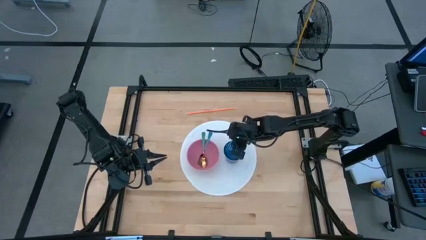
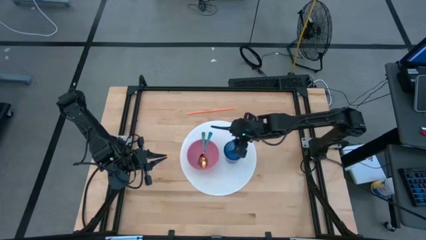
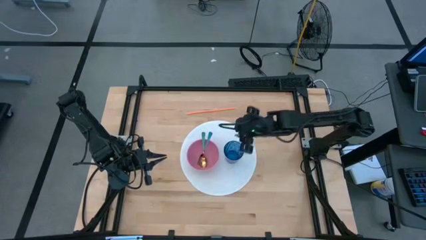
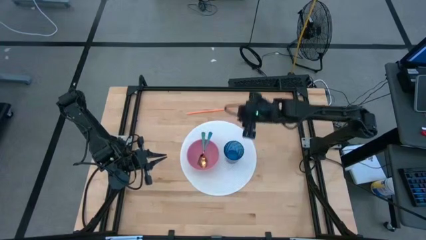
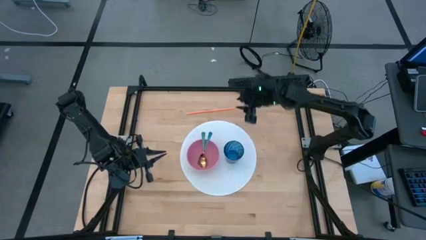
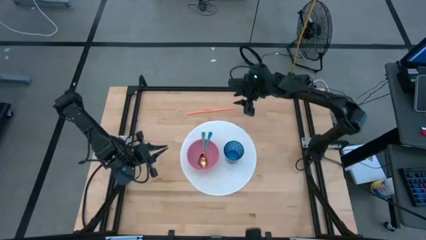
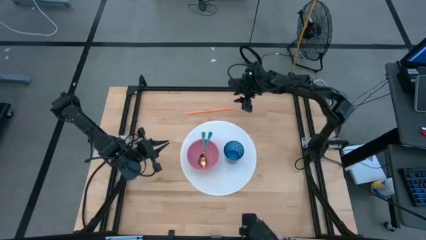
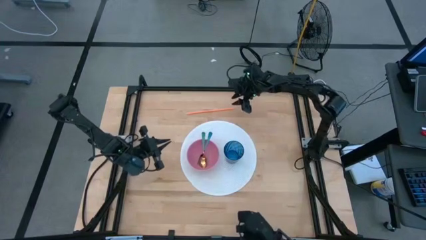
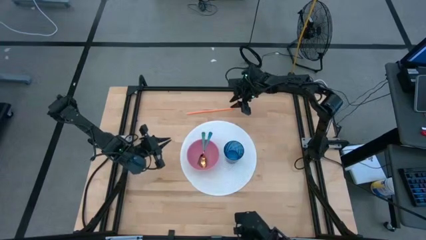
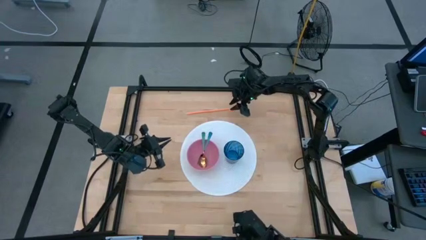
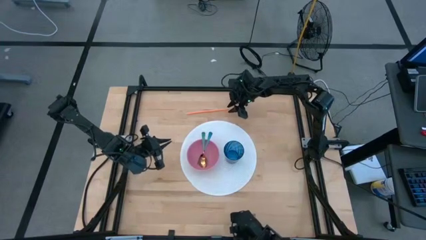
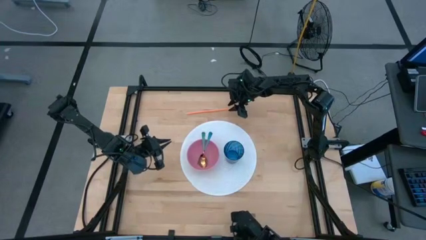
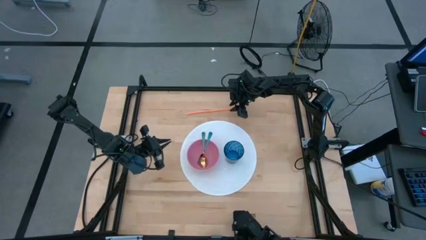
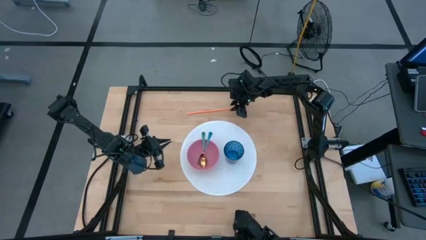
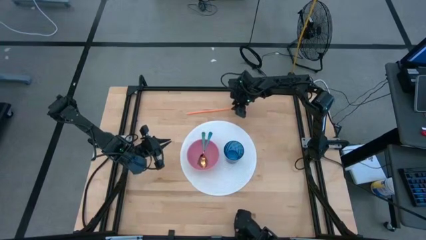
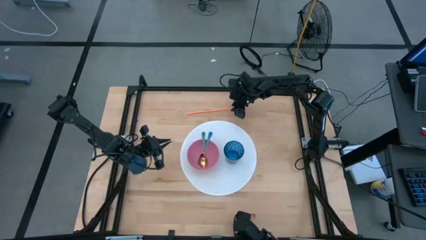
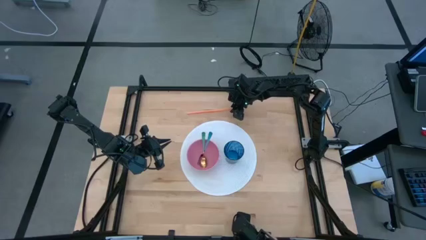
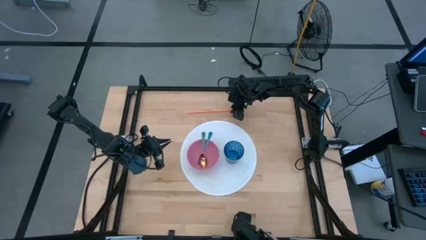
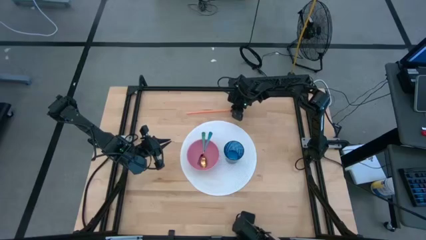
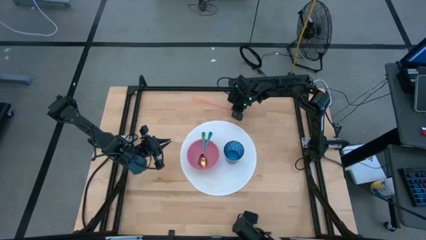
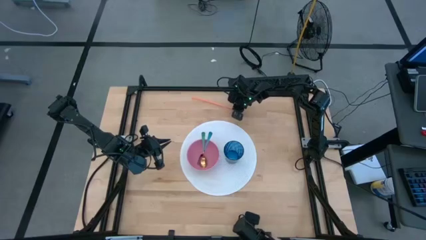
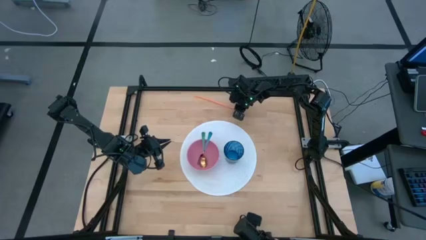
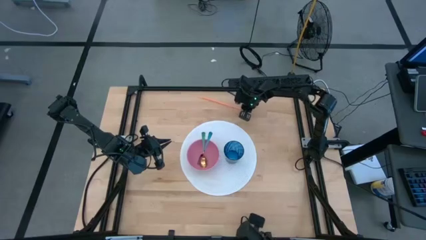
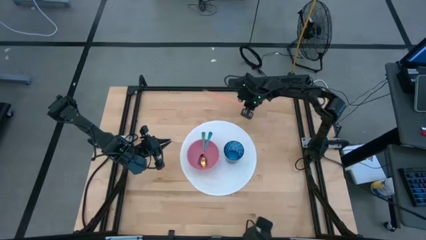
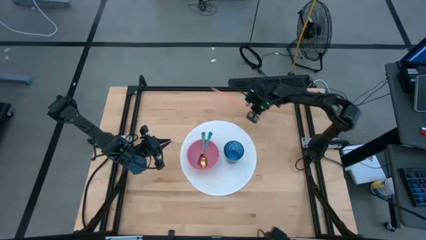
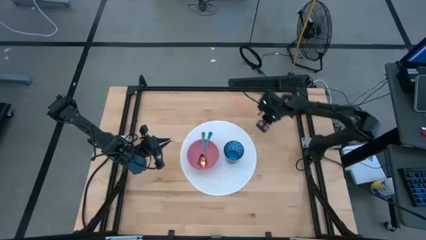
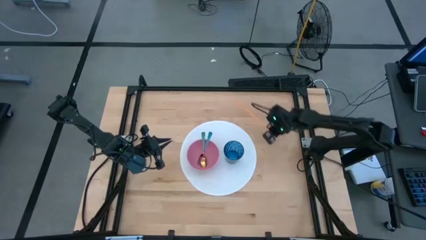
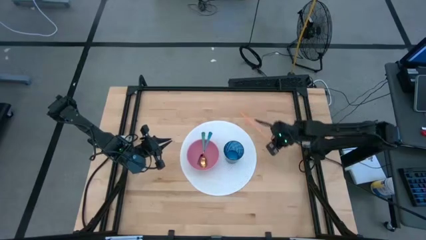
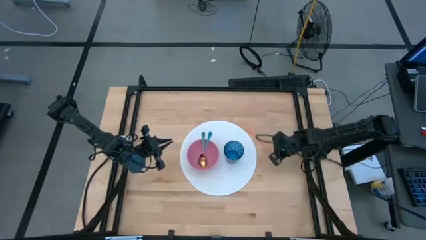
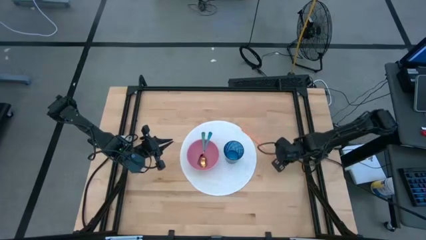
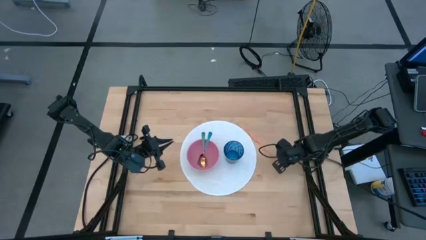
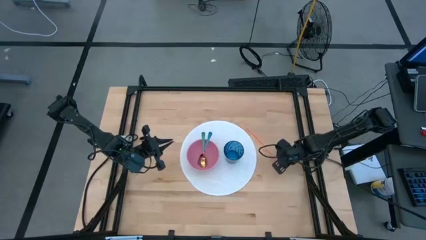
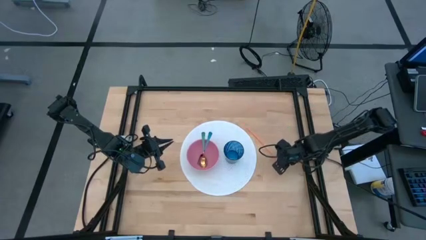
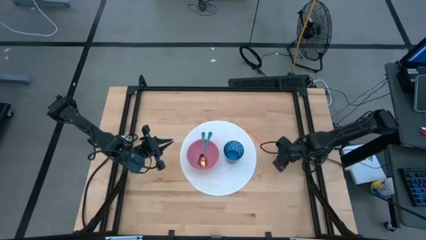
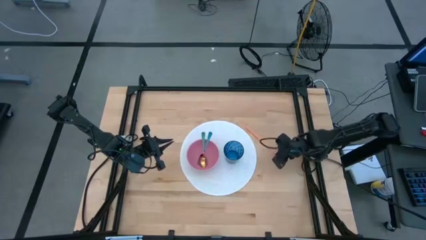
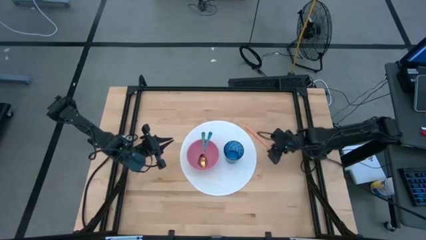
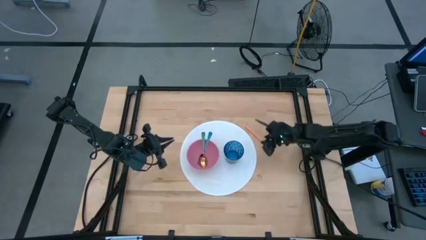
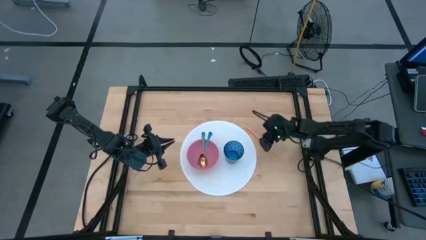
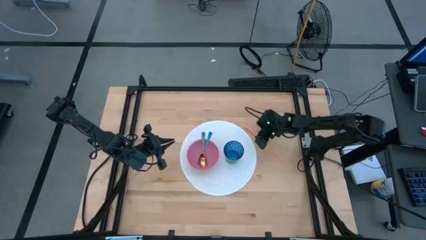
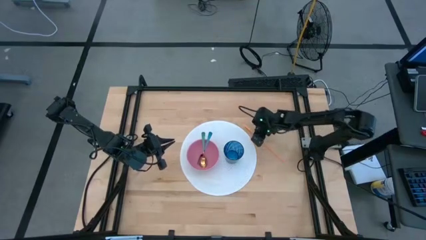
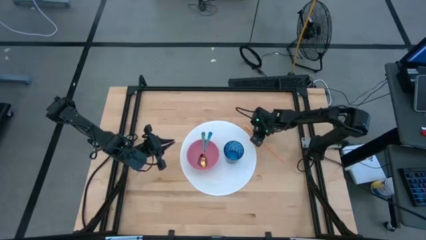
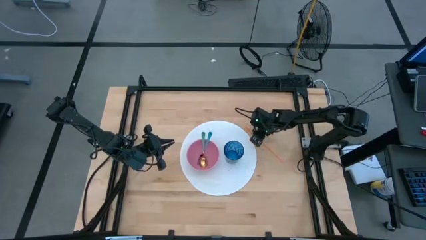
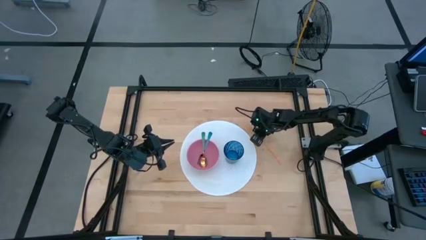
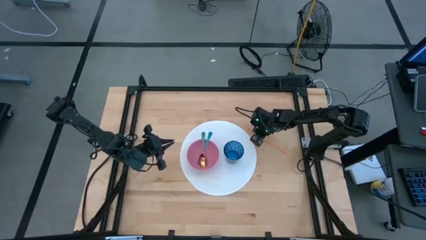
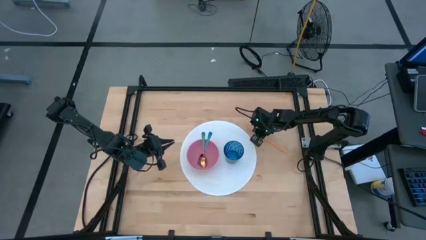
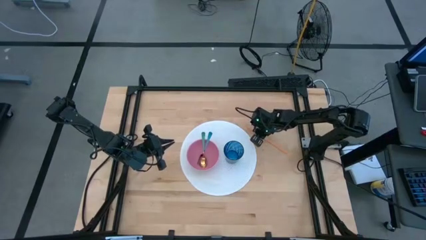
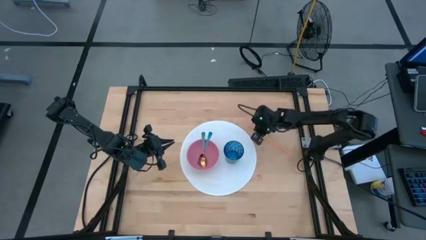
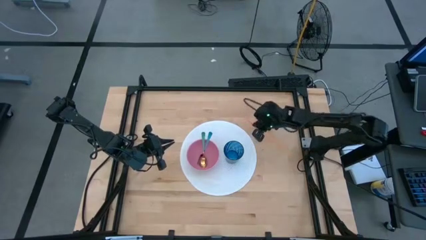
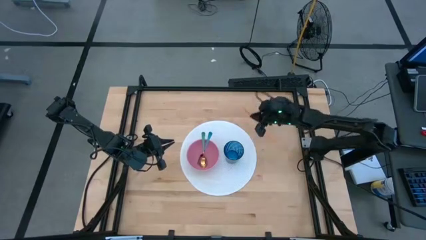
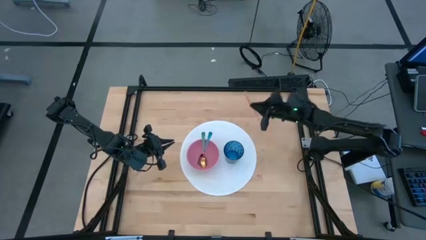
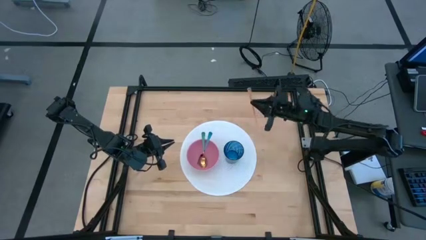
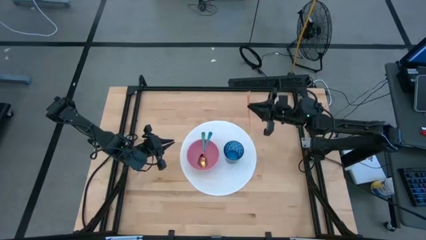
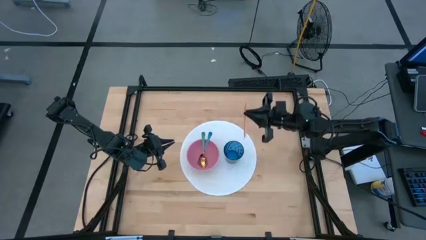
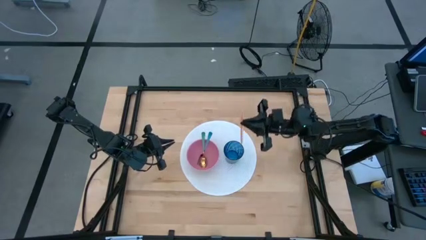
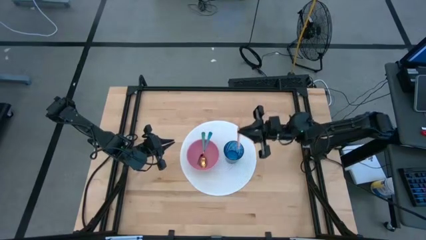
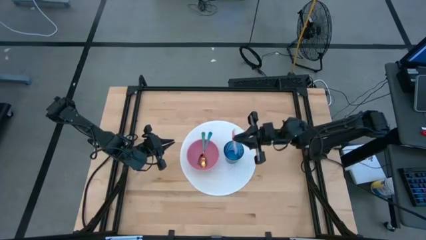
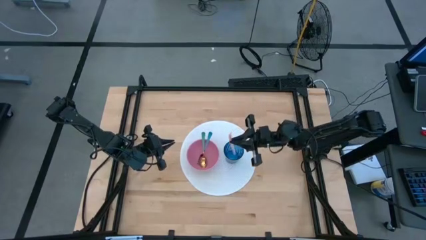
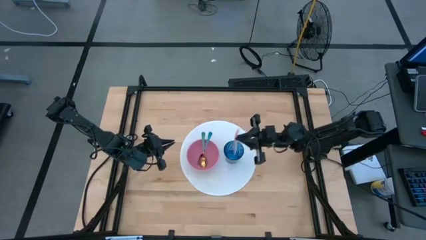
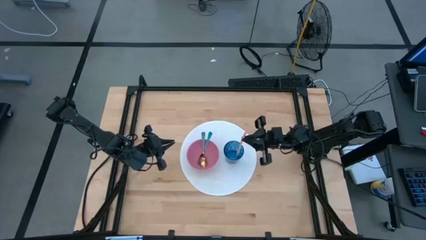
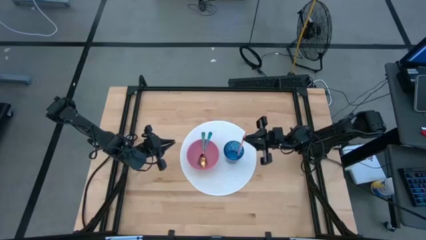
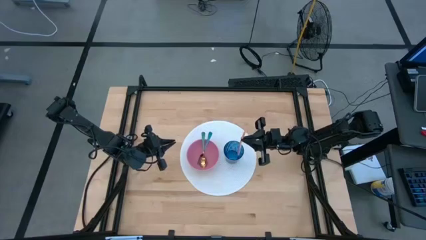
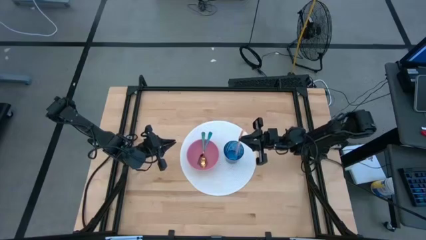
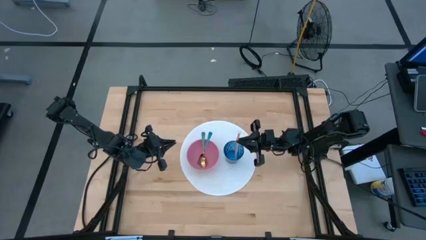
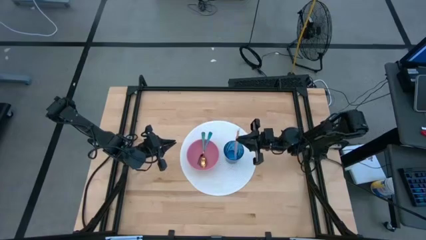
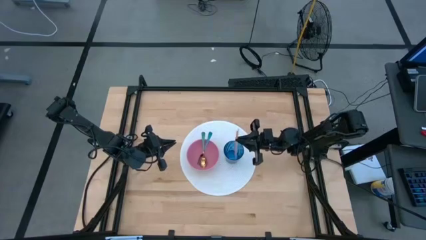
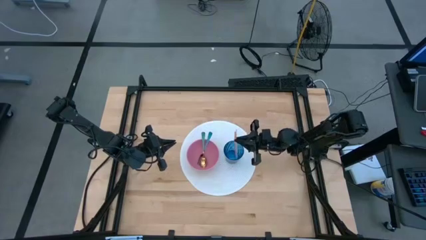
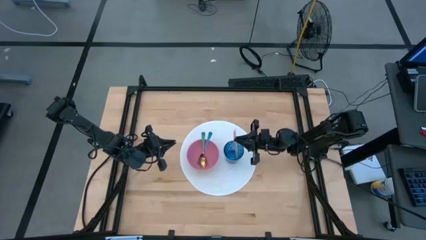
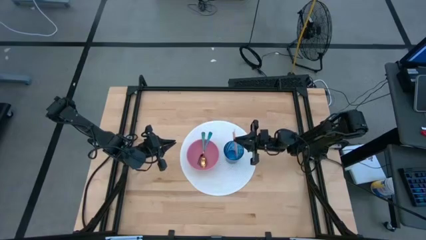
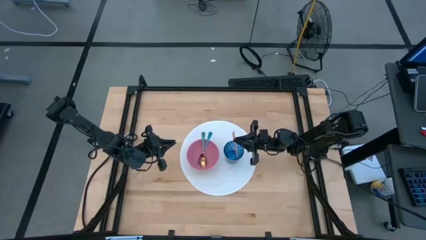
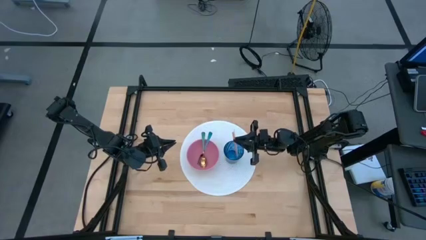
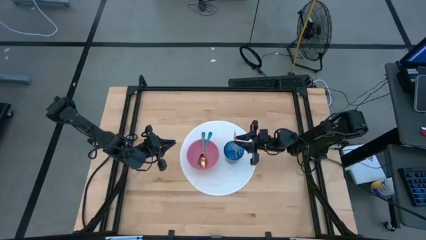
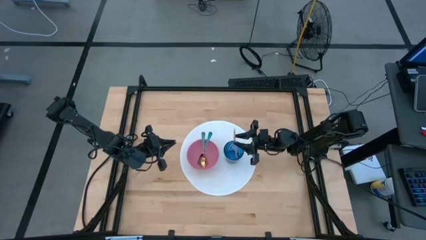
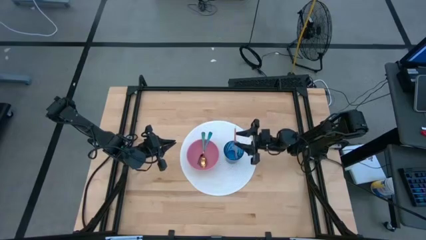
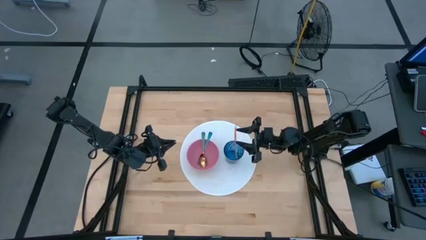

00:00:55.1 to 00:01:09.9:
Task: Pick & Place Utensil
Put the orange straw into the blue glass

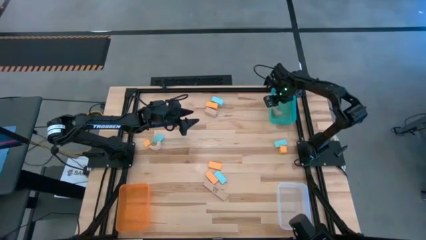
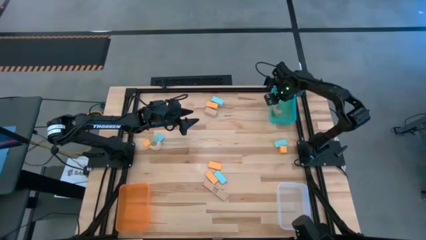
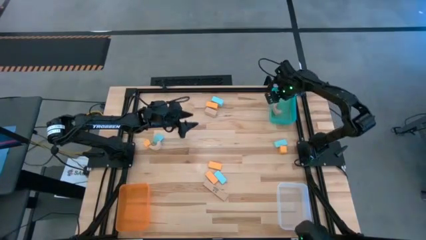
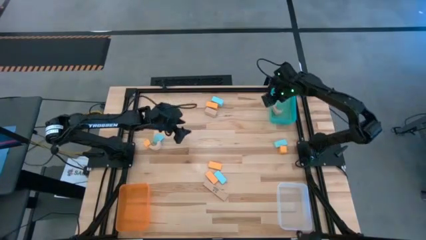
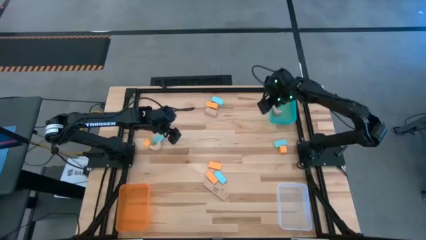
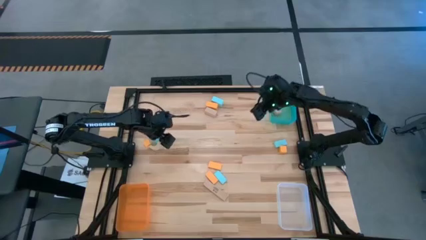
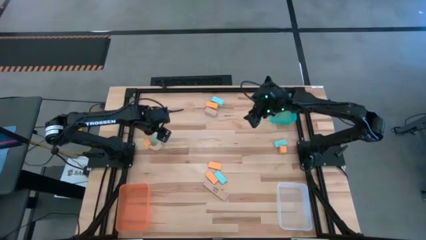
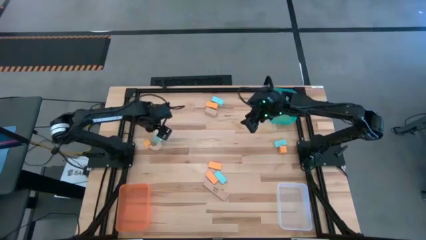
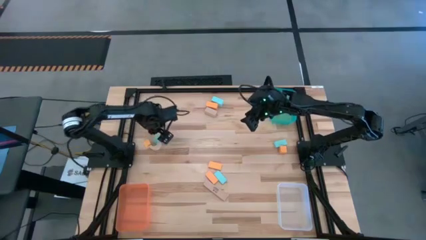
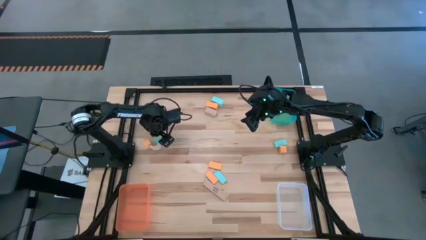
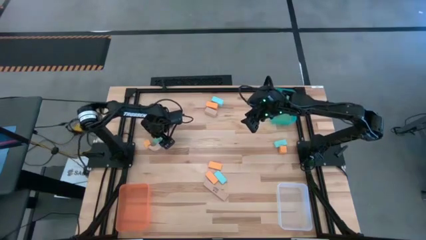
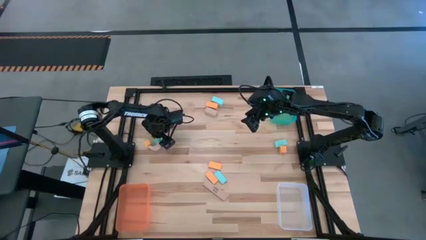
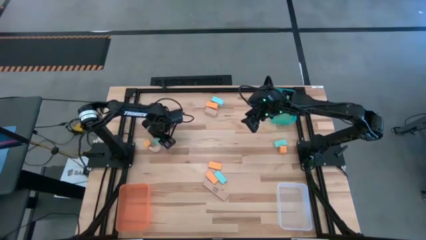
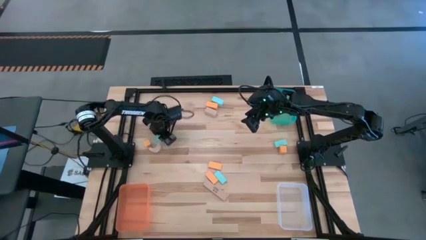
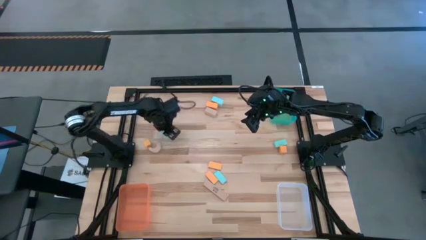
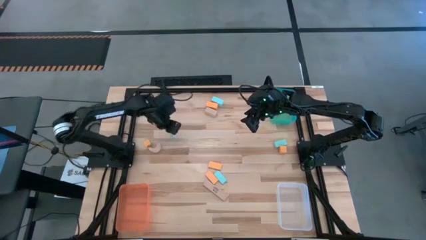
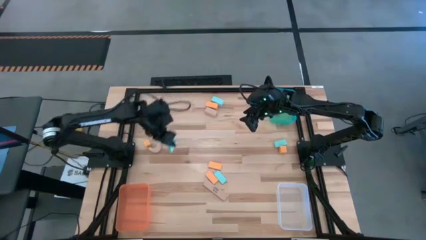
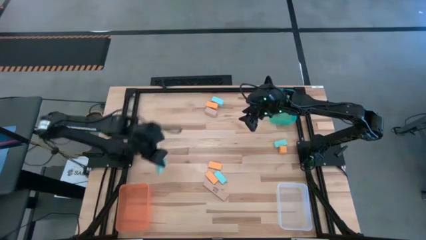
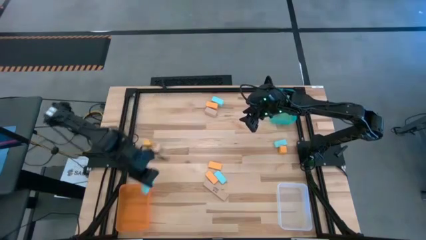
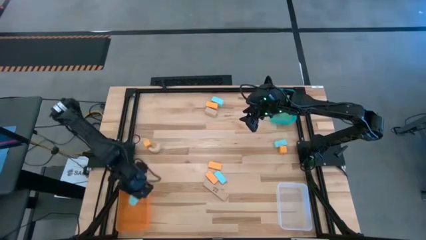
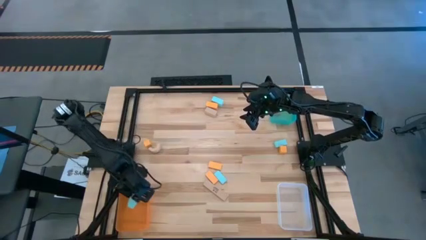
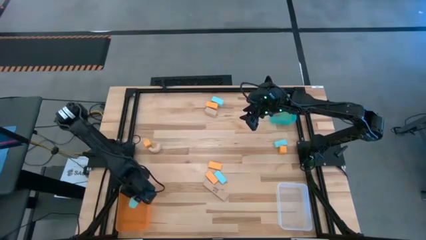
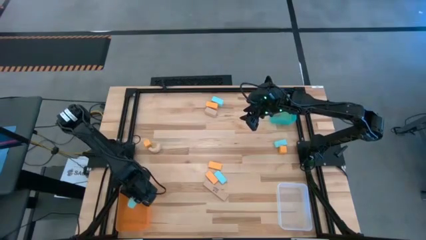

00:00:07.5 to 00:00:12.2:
Task: Sort & place blocks by color
Put the blue block into the orange bin
